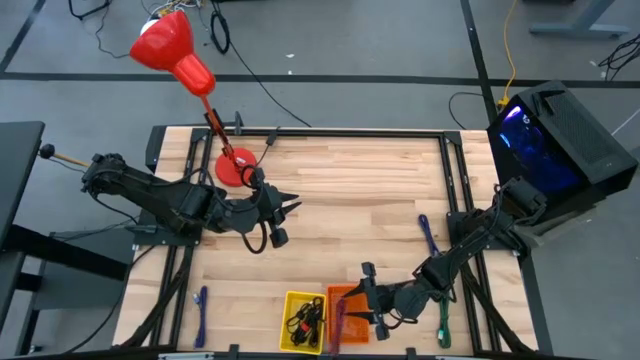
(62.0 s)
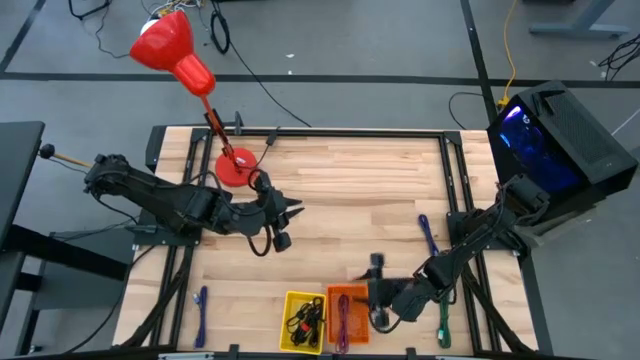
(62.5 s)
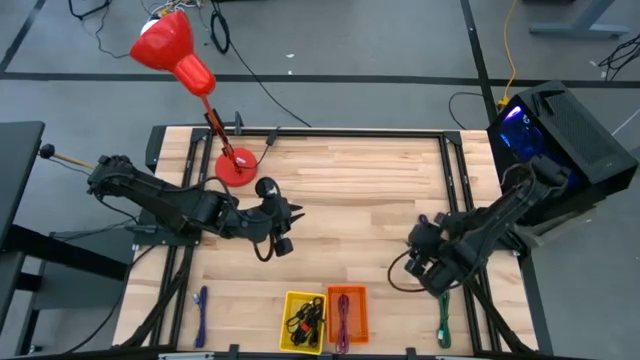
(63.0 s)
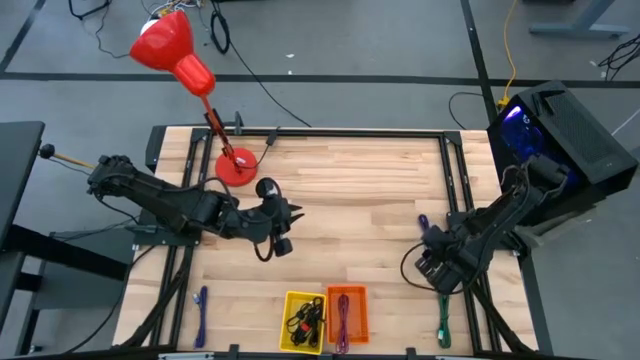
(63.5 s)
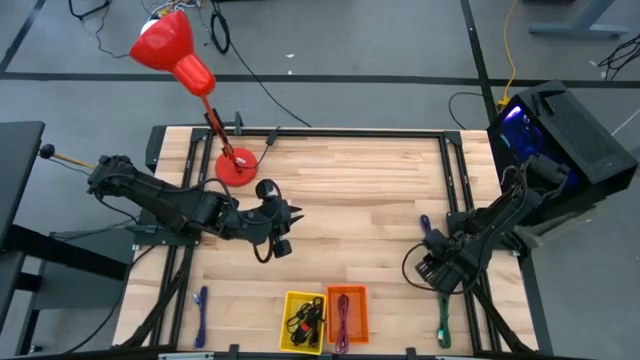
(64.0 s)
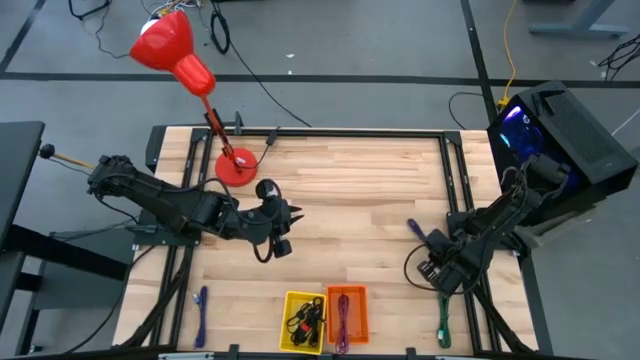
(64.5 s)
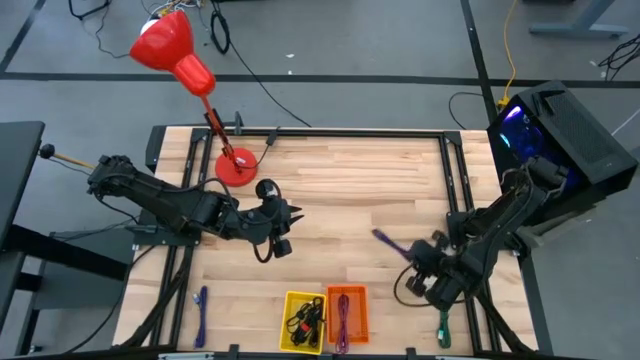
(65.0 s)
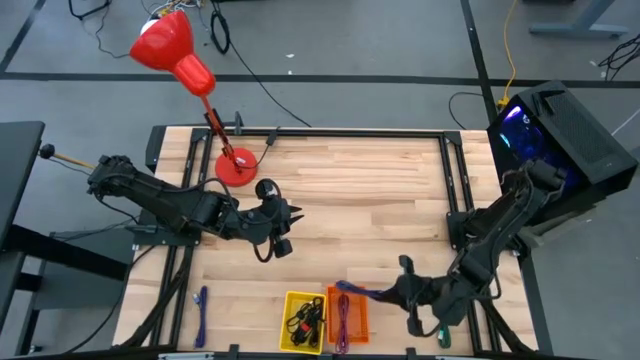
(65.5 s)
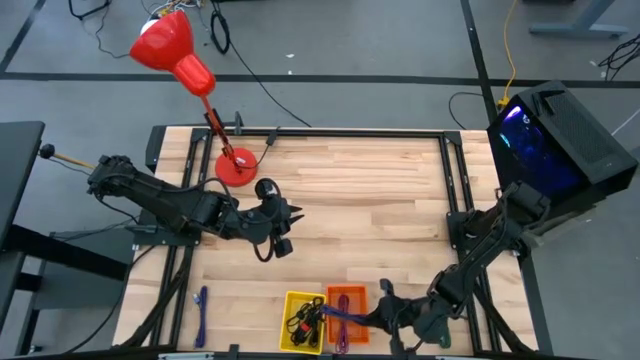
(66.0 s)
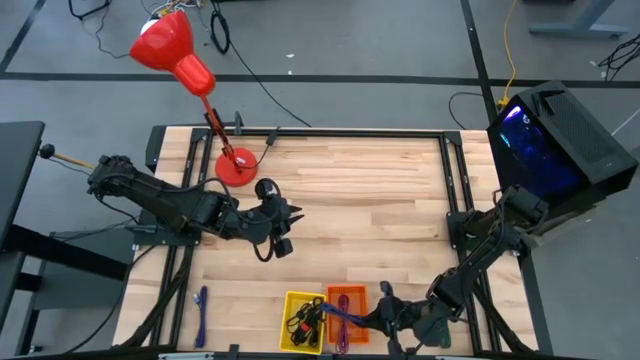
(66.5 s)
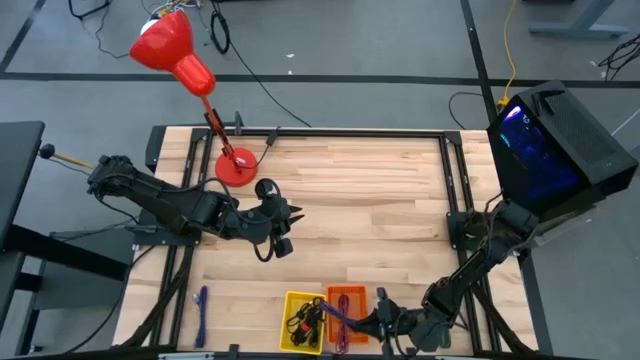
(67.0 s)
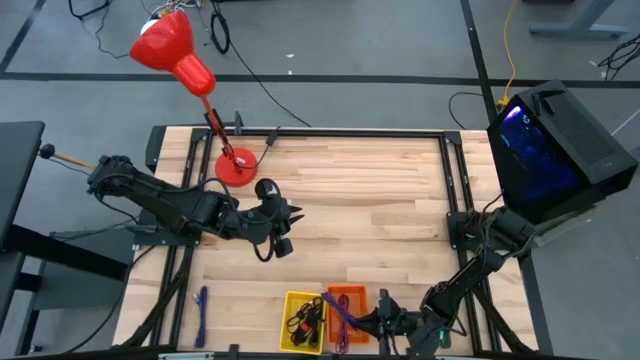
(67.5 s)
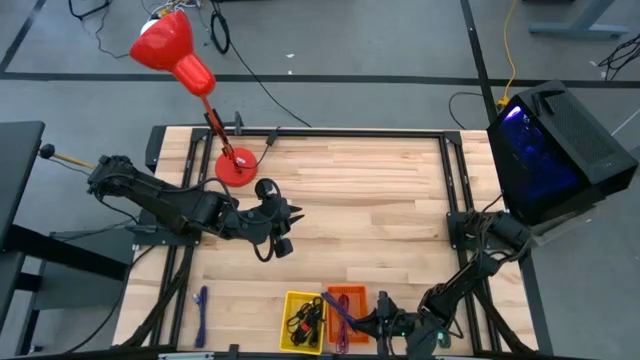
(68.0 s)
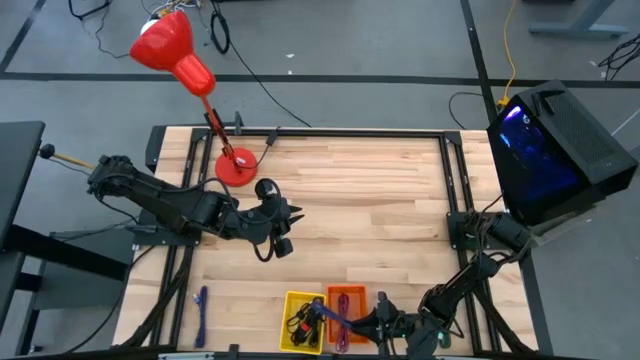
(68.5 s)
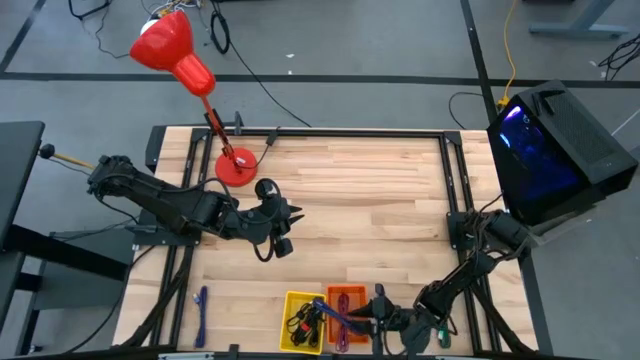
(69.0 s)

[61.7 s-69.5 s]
Task: Pick & Place USB Port
Put the black and purple charger cable into the orange bin

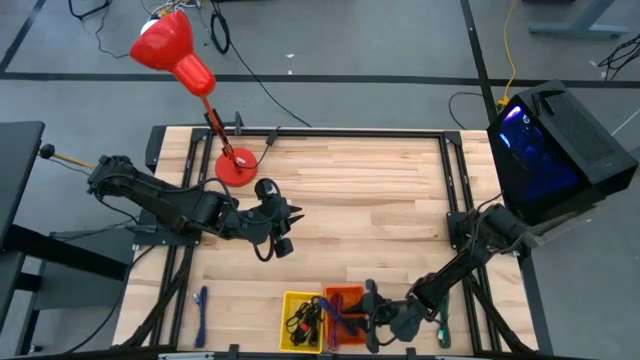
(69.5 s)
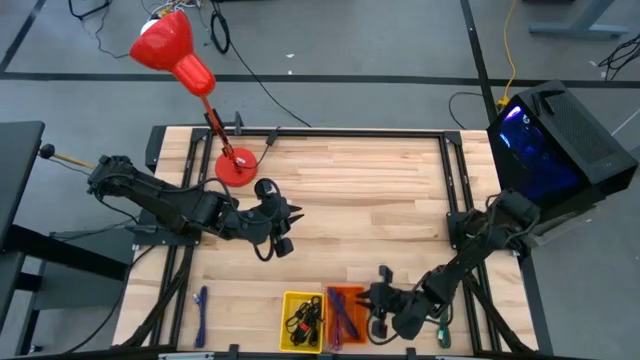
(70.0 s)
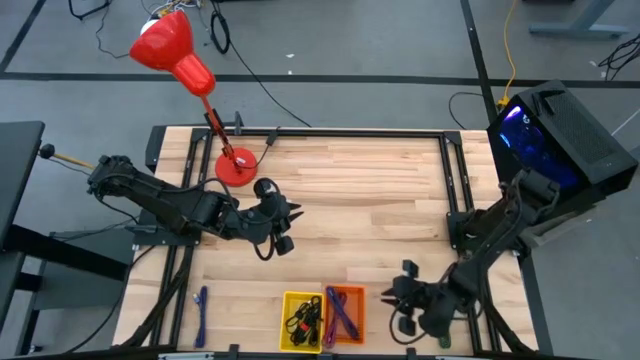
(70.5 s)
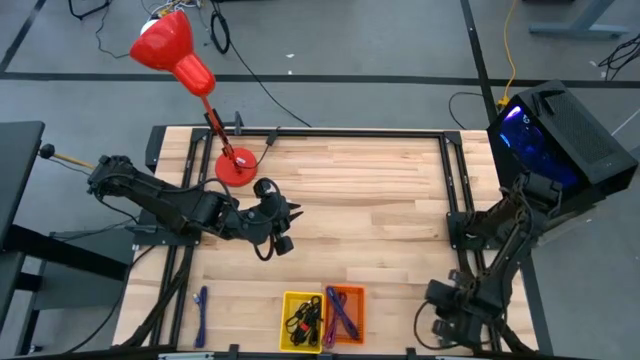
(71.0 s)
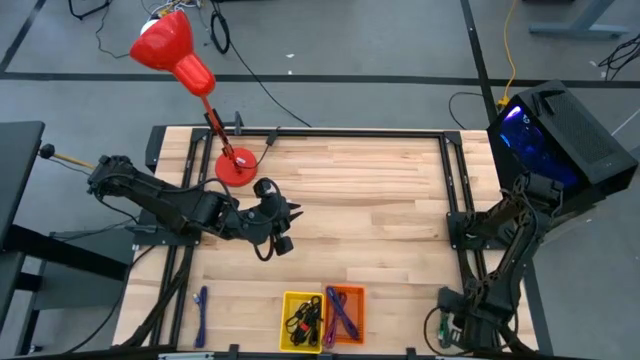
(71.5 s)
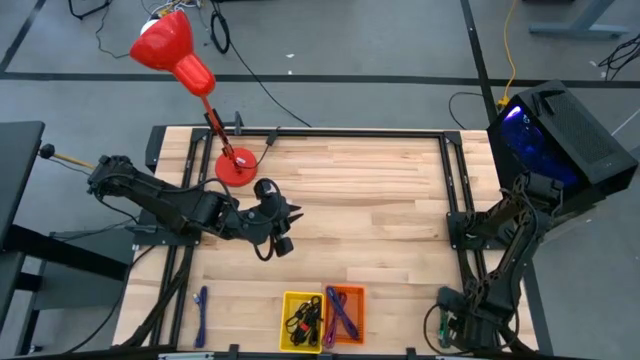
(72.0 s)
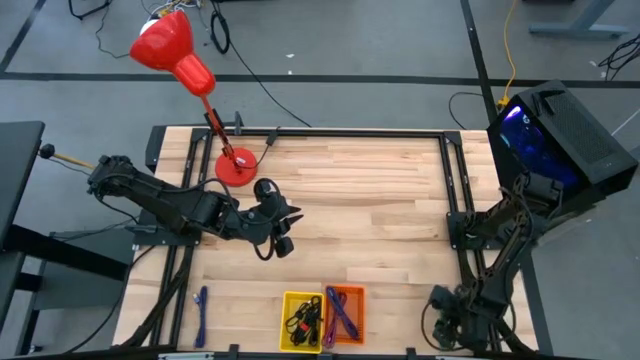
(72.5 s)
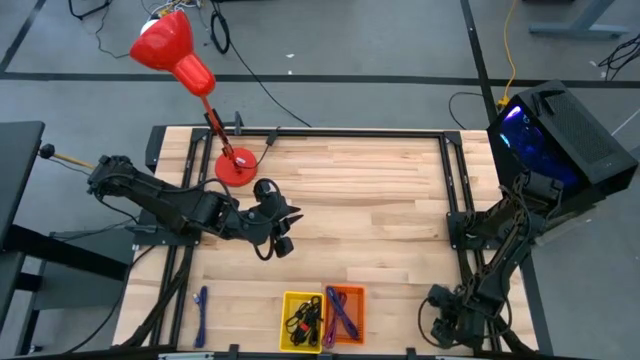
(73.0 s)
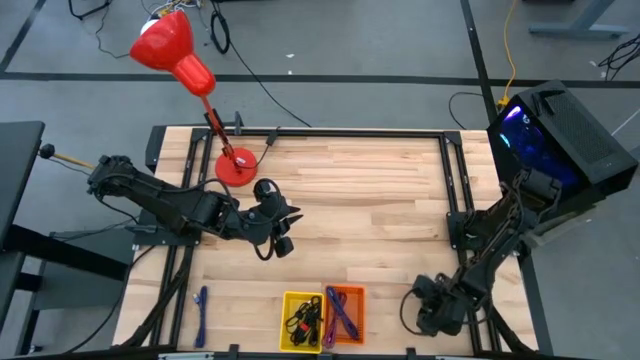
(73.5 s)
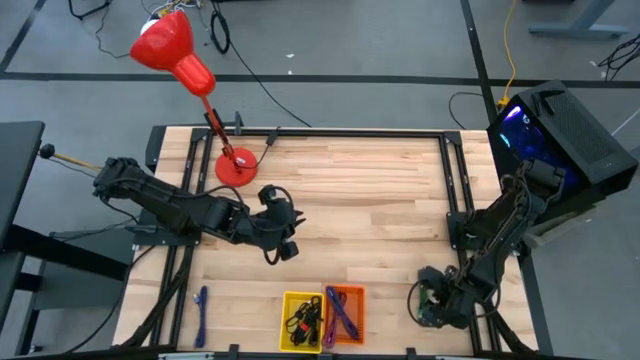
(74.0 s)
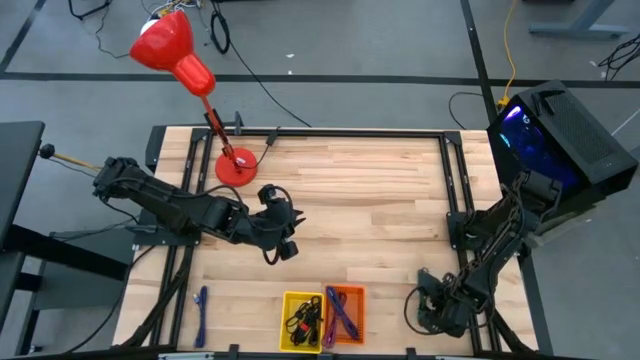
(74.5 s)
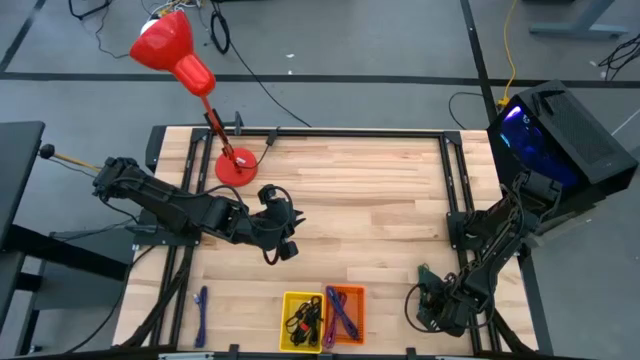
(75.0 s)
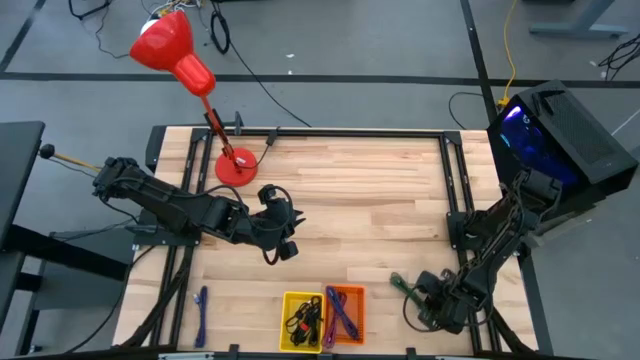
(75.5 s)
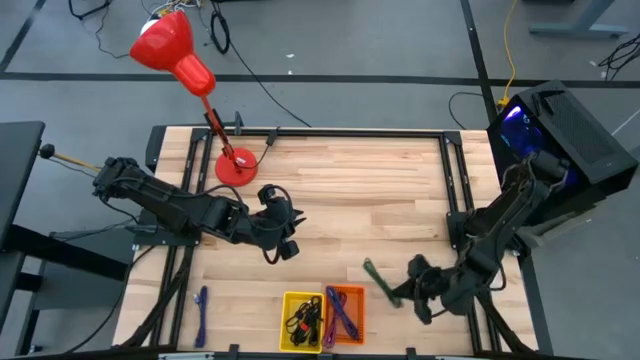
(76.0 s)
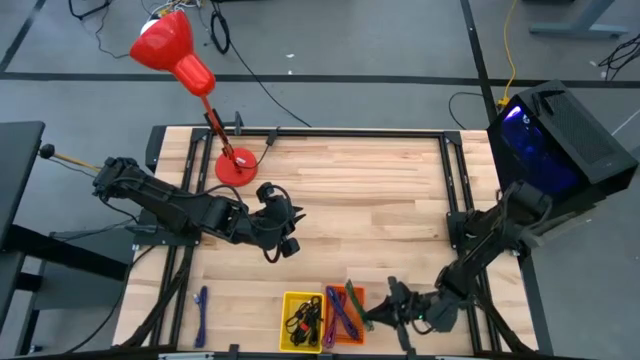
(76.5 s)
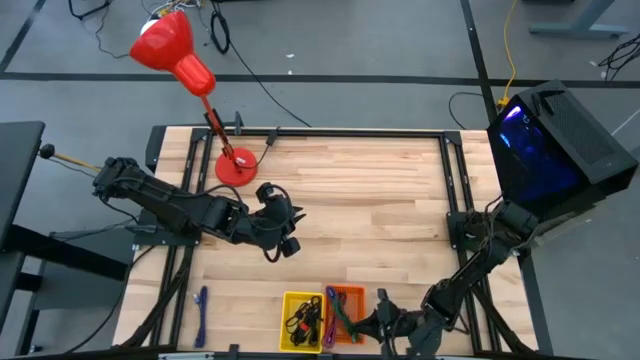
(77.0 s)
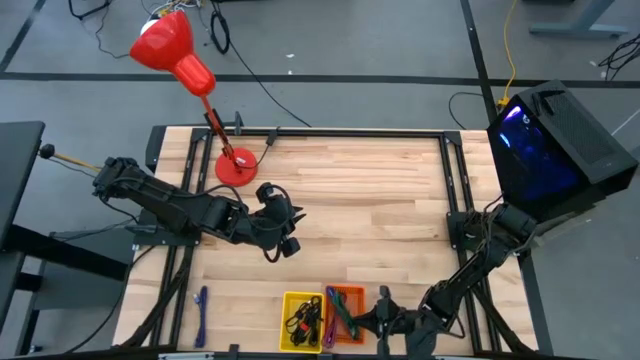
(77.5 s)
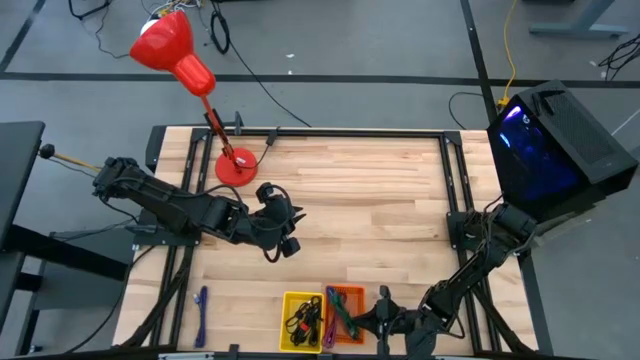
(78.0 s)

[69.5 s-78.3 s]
Put the black and green charger cable into the orange bin

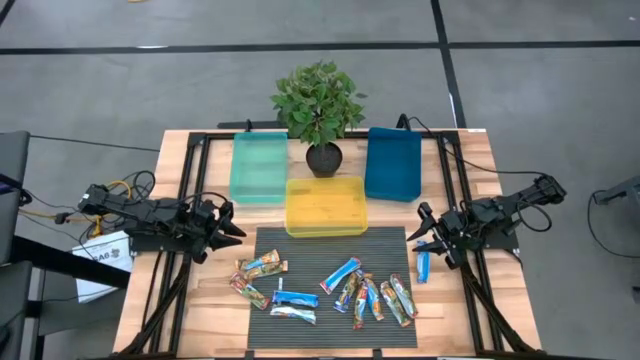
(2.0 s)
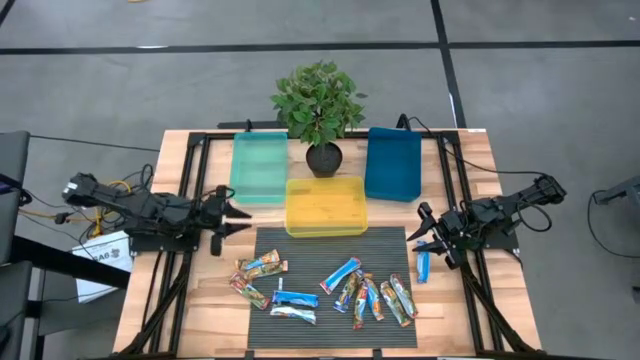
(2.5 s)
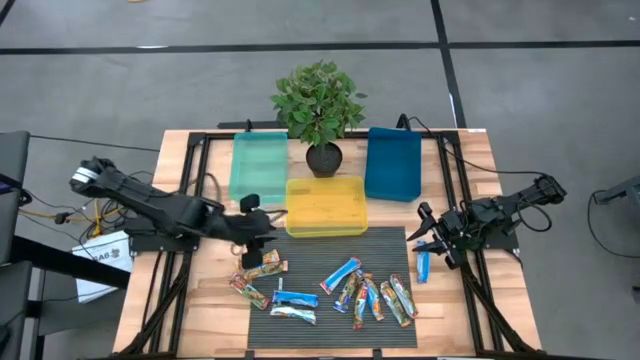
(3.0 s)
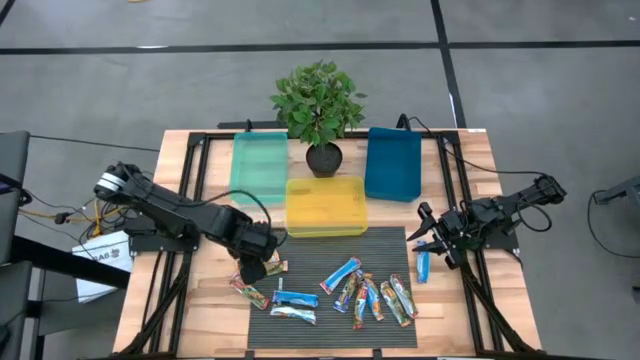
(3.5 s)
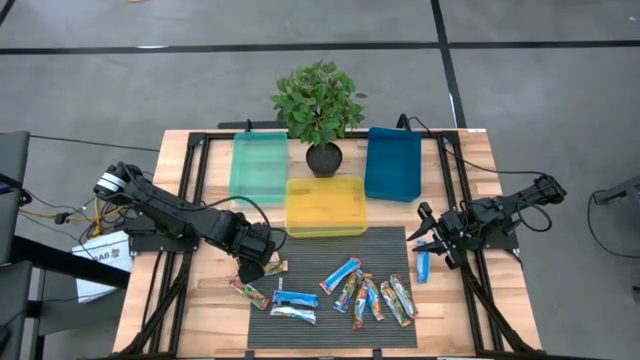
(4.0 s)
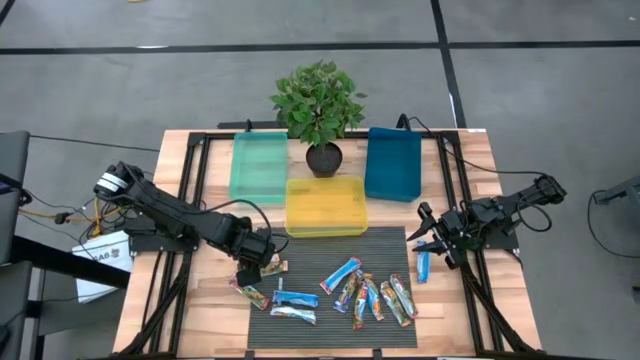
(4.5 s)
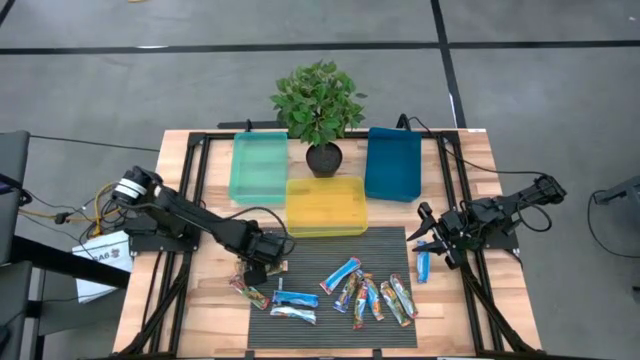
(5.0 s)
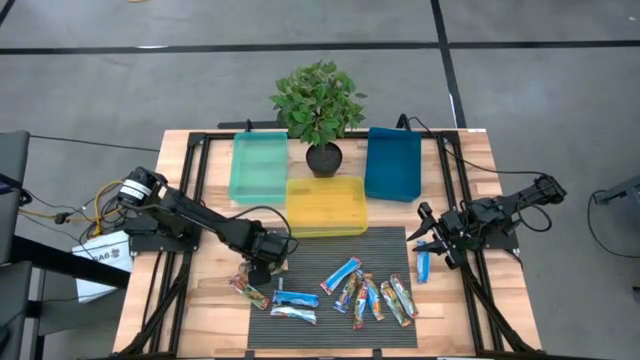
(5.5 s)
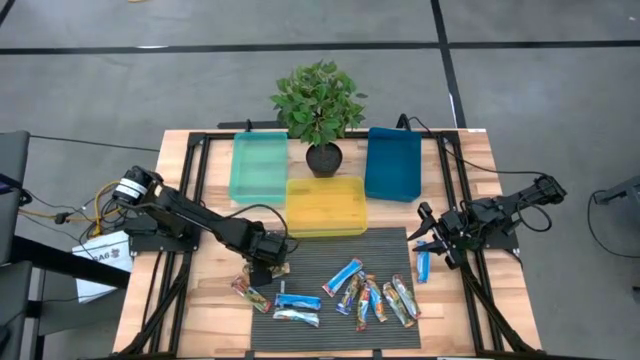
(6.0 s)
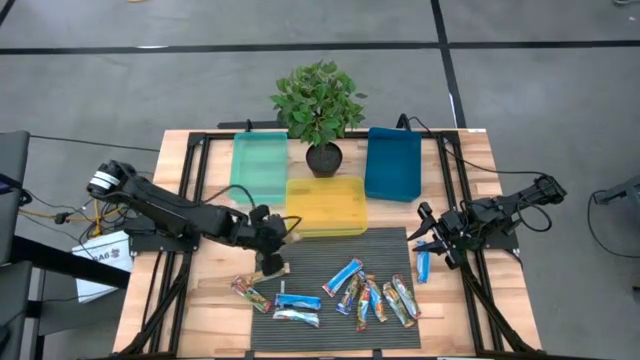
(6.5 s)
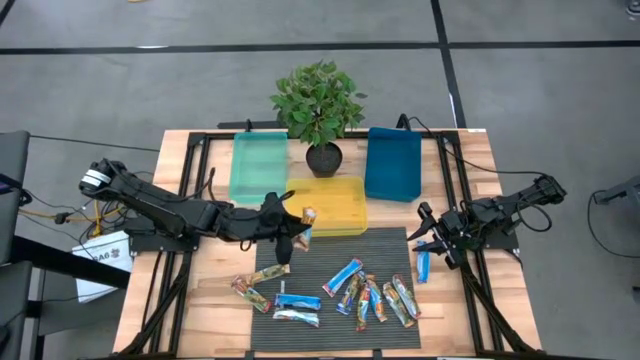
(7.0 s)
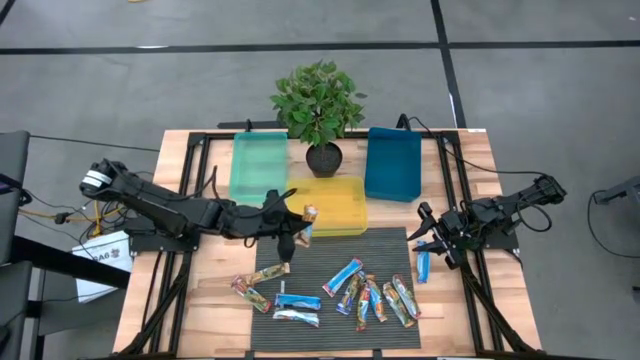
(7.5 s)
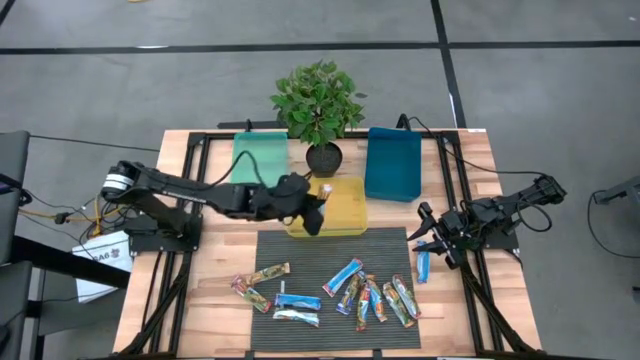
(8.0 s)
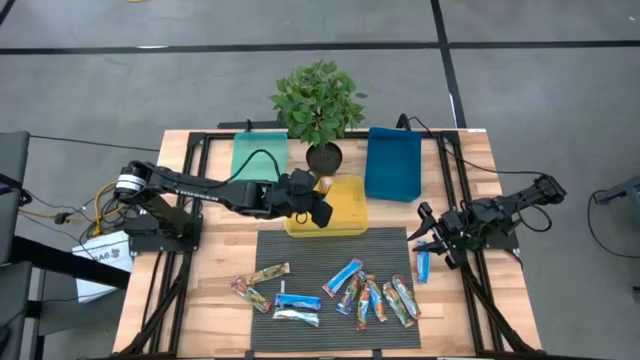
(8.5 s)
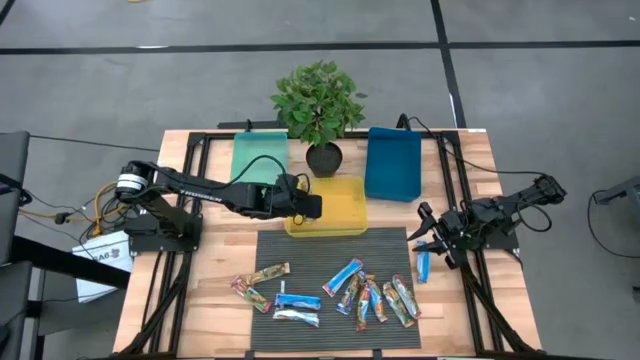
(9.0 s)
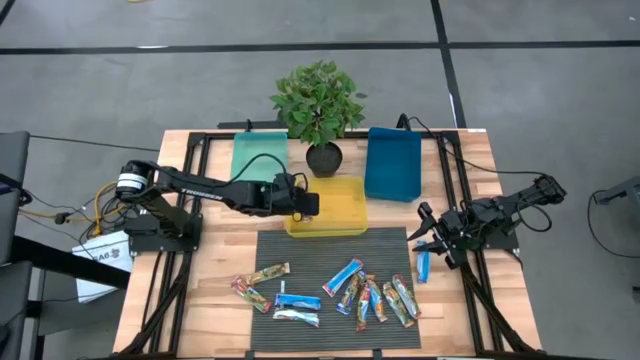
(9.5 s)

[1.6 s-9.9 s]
Task: Pick and place Granola Bars by type
Put the orange granola bar into the yellow bin
